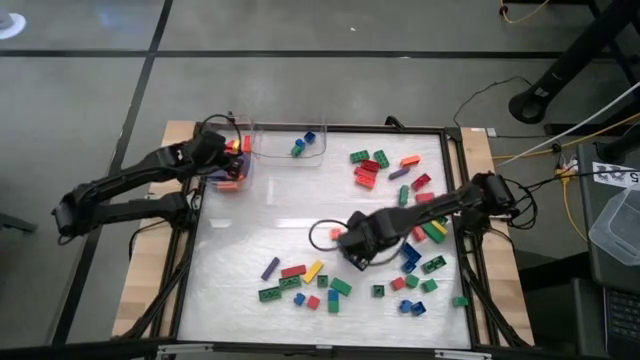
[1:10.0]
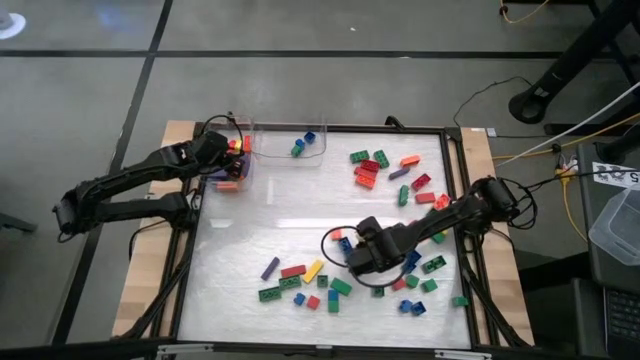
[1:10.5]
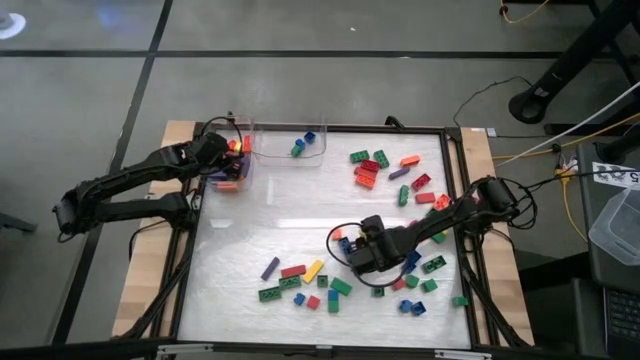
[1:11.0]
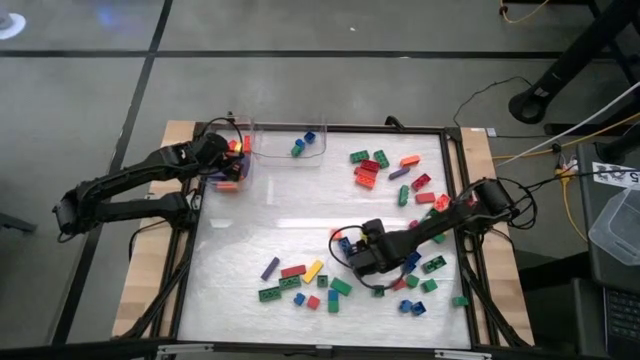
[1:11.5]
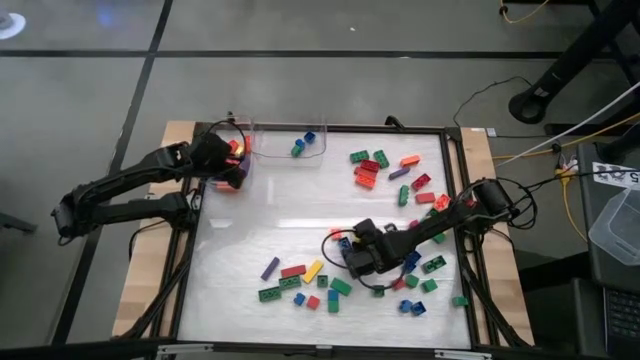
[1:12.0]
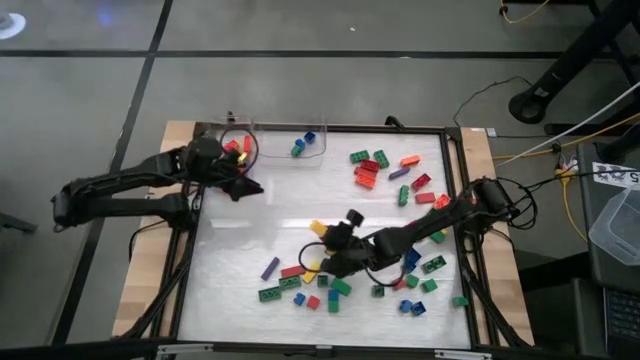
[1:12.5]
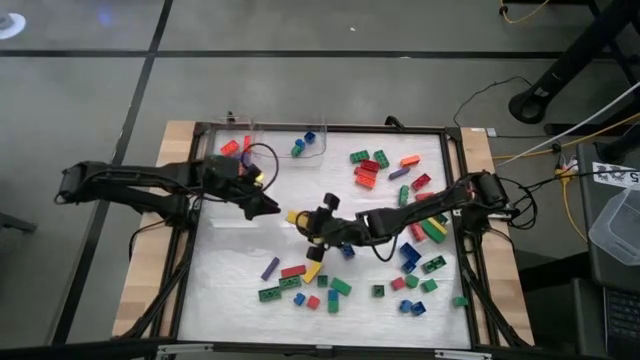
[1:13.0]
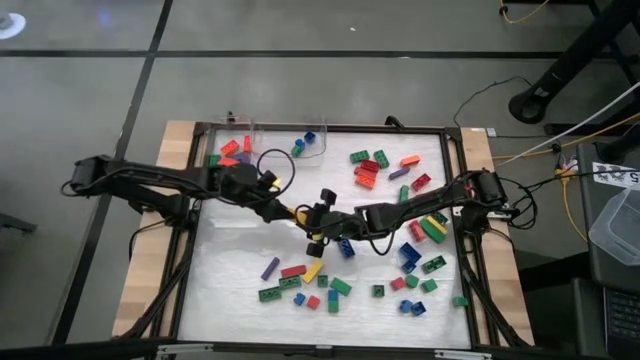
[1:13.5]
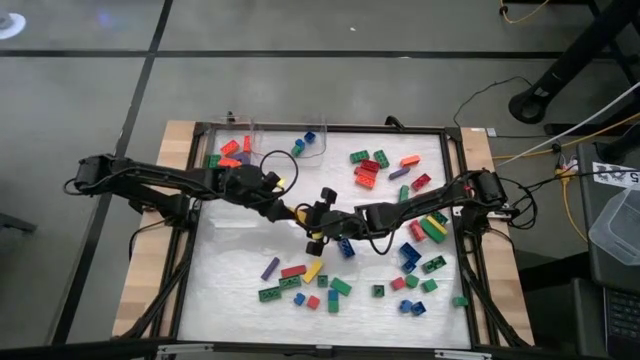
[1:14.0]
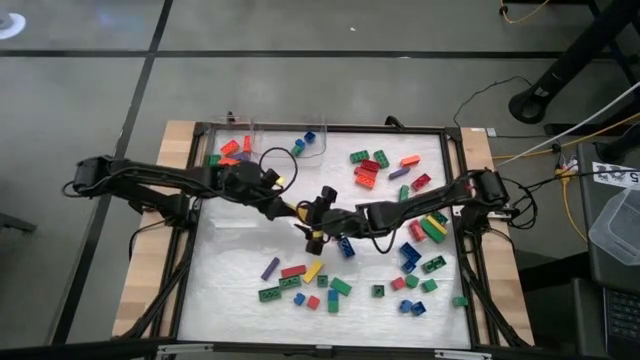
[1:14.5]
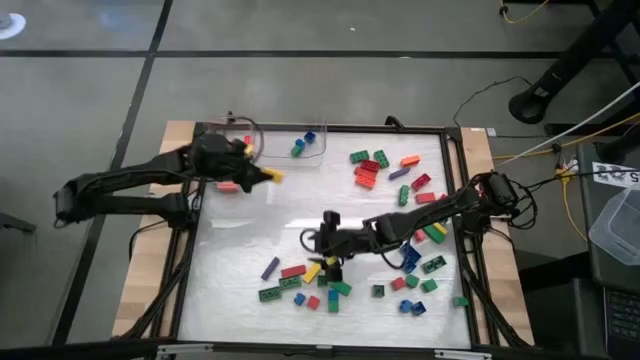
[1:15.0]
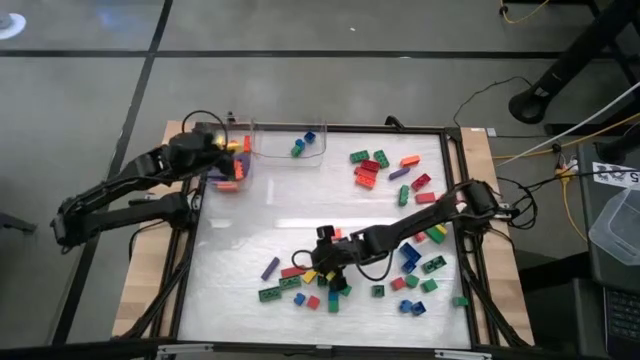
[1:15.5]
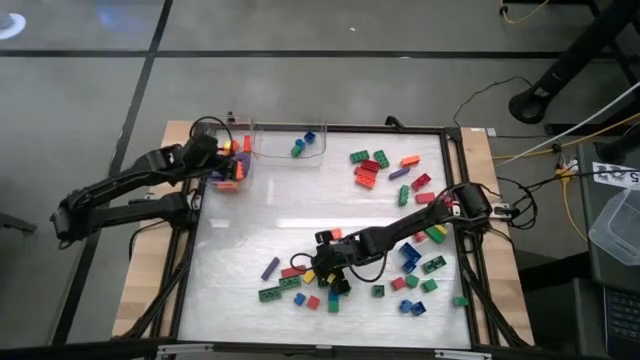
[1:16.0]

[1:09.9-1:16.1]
Task: Sort blocks by size
Put the large yellow block into the left transparent bin

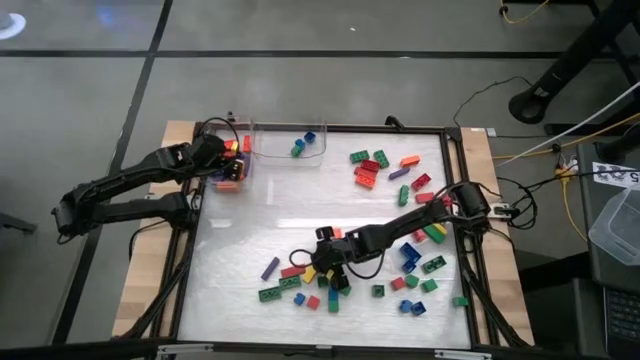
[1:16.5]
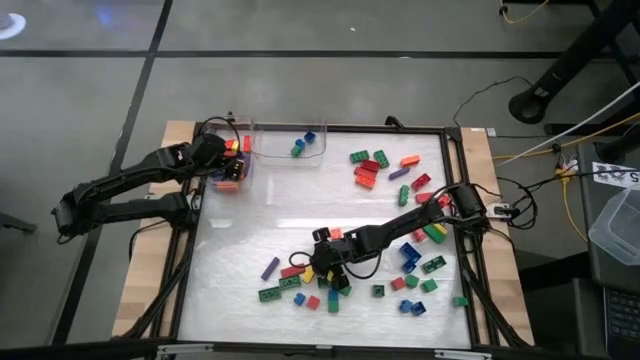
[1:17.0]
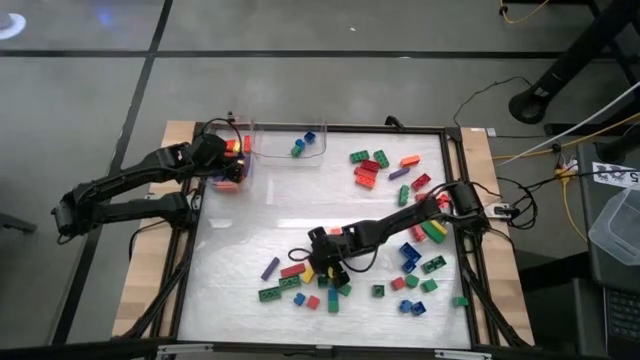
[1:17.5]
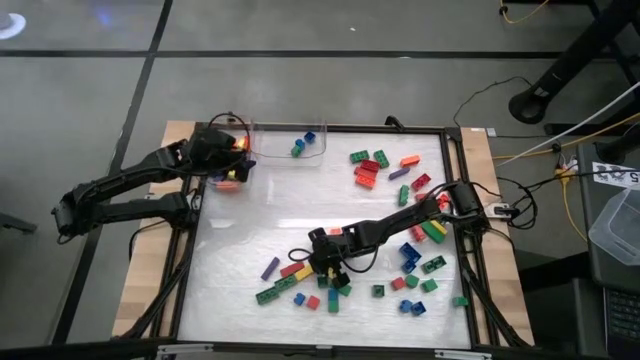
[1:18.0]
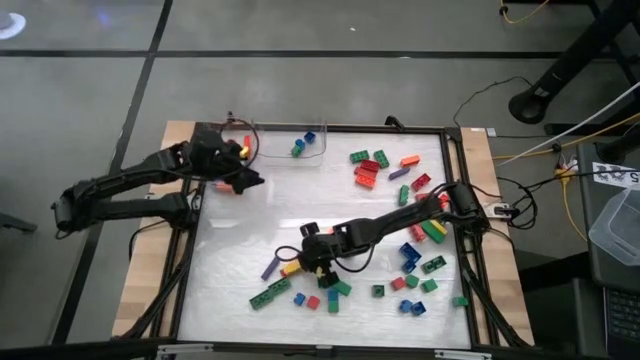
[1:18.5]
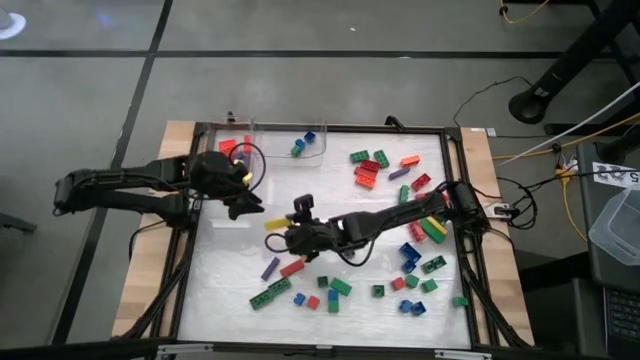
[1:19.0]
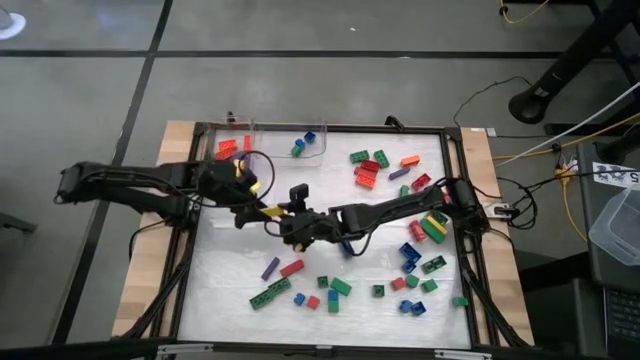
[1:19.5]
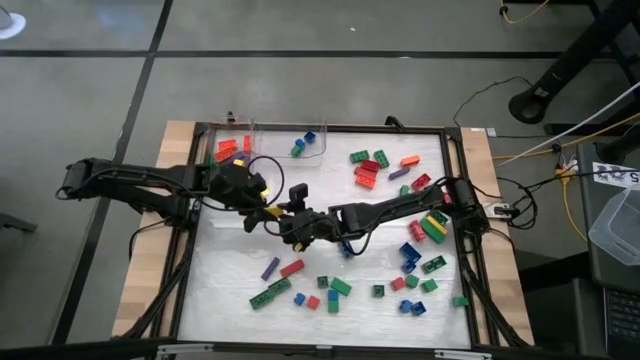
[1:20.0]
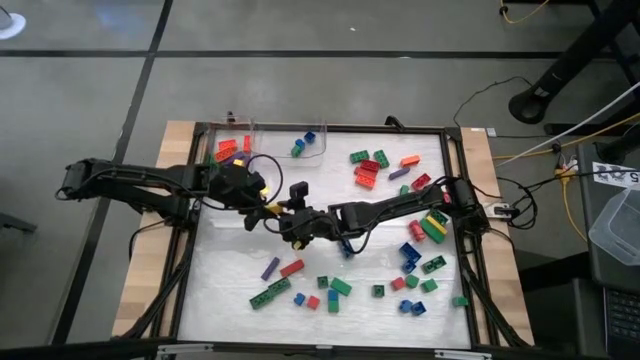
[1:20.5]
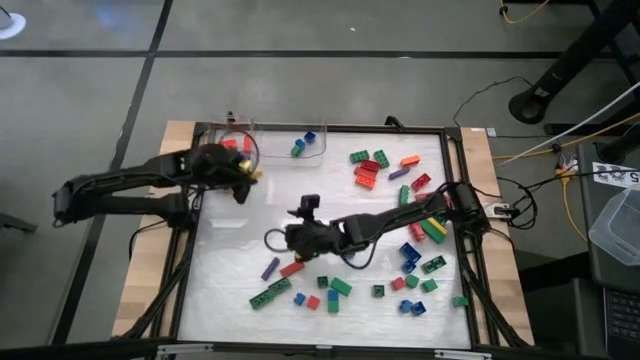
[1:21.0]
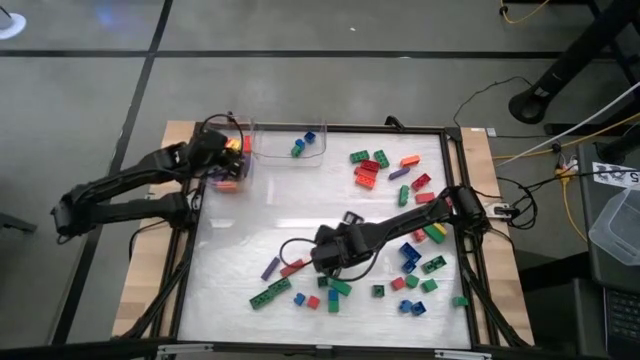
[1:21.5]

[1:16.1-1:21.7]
Put the large yellow block into the left transparent bin

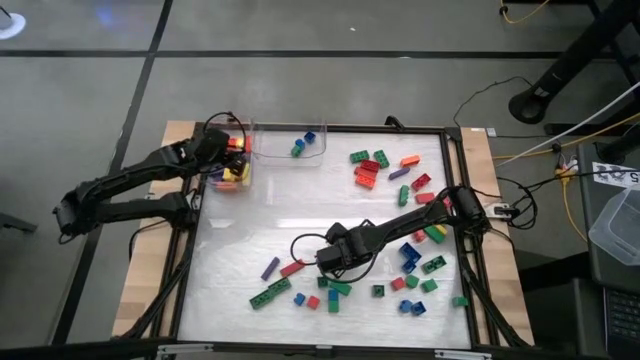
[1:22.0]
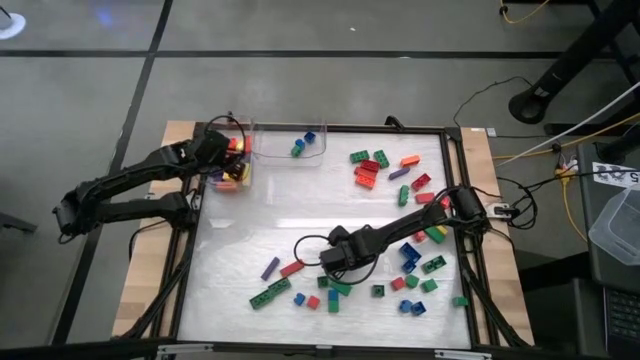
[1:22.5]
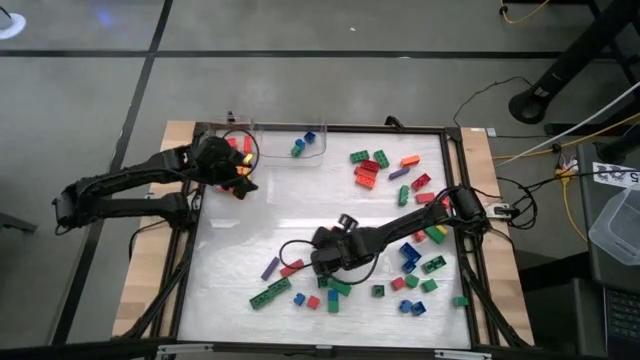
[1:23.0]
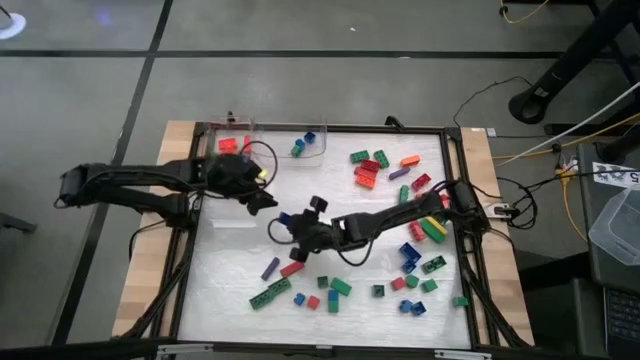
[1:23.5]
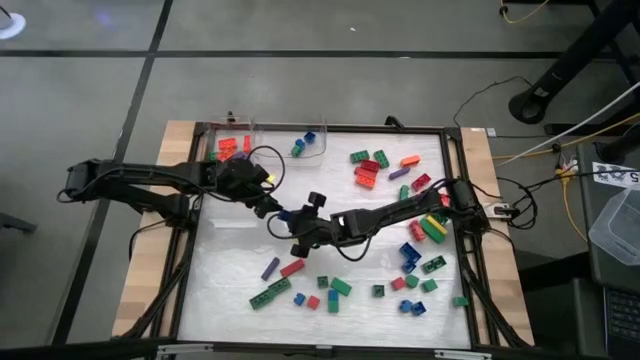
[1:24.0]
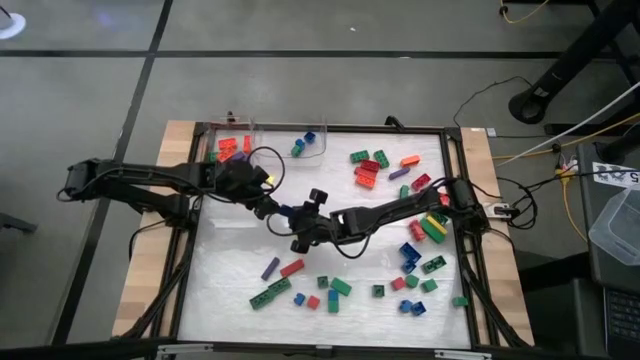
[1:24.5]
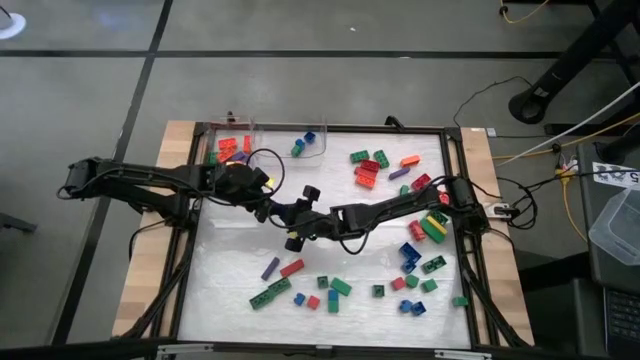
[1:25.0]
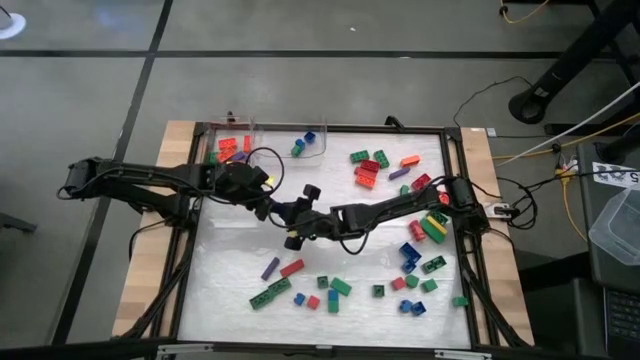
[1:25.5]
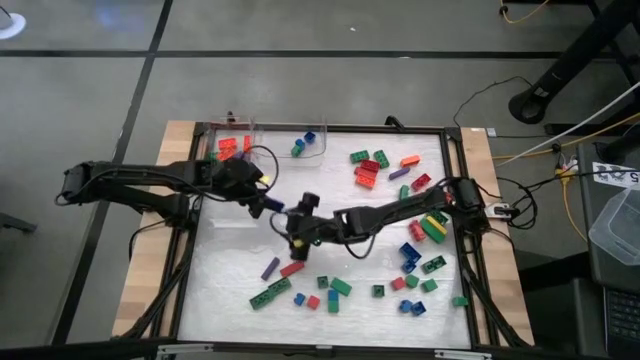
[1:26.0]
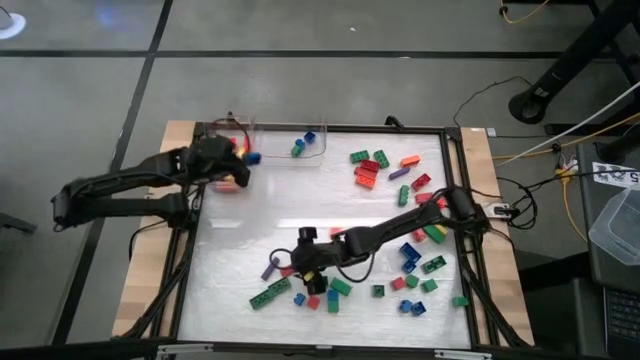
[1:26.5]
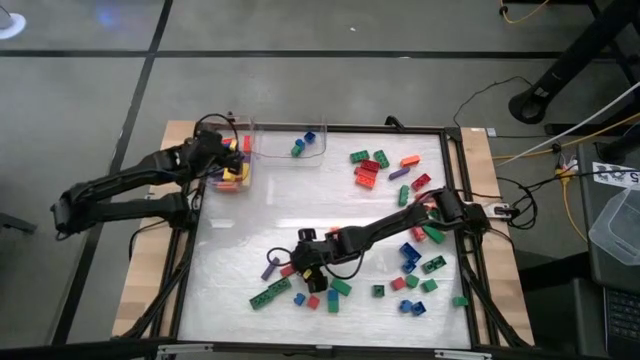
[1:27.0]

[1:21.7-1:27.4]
Put the large blue game piece into the left transparent bin

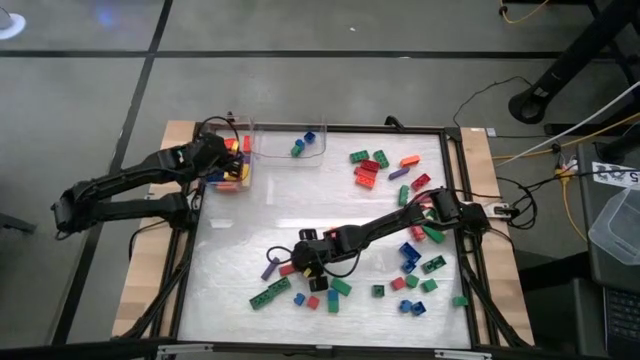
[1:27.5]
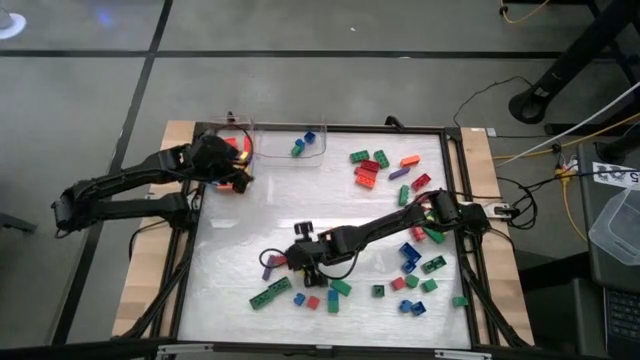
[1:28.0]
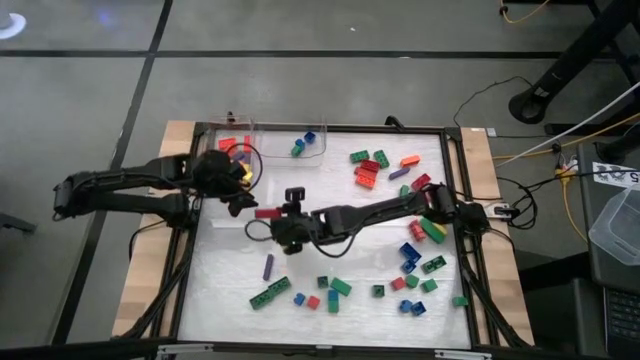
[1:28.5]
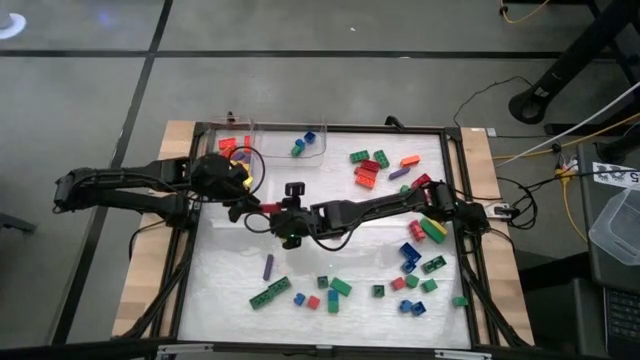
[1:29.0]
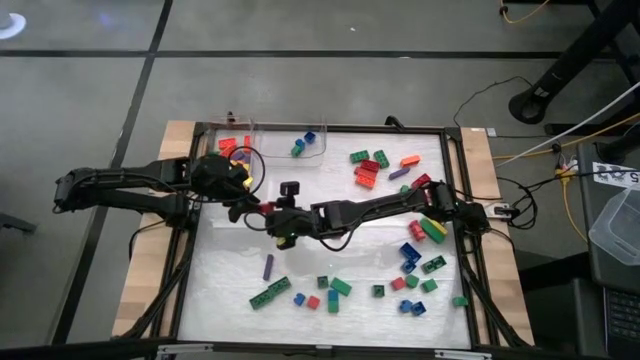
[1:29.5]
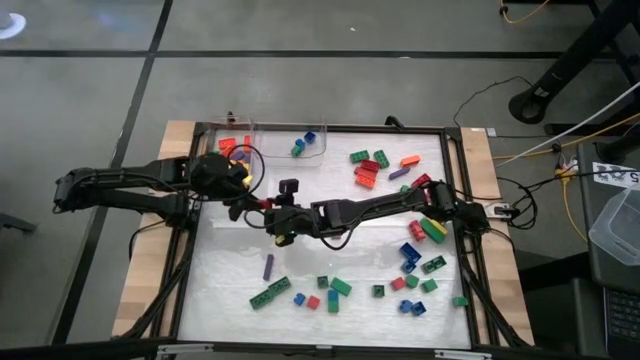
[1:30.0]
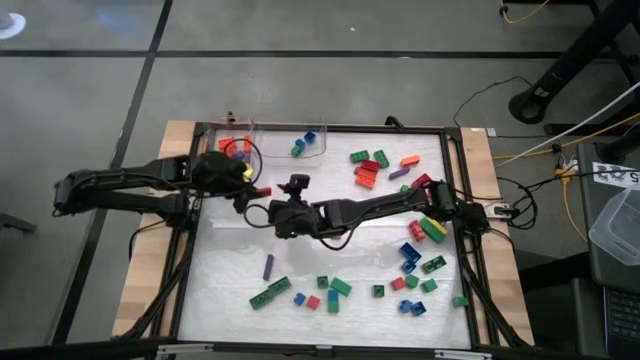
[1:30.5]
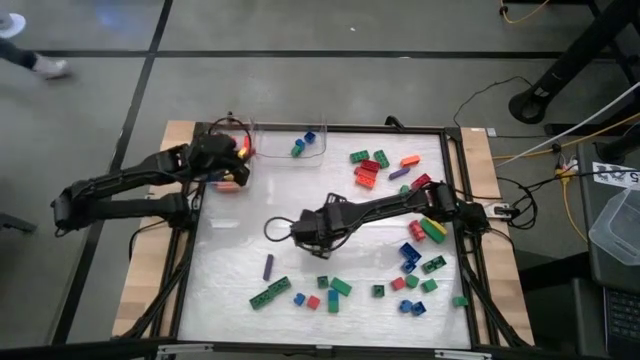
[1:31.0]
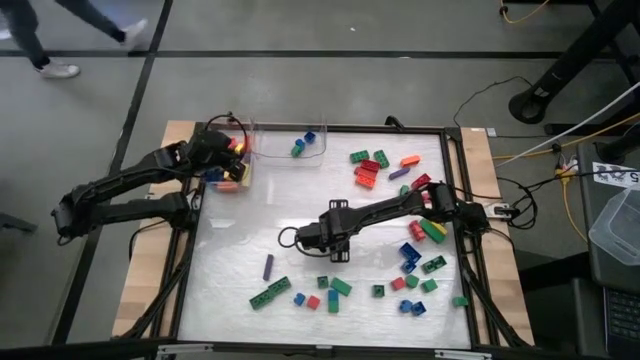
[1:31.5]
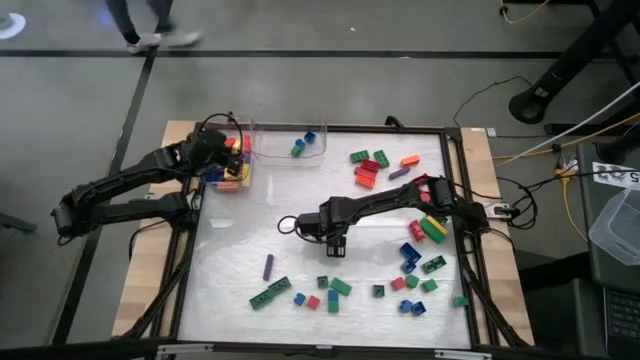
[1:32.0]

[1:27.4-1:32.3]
Put the large red block into the left transparent bin
